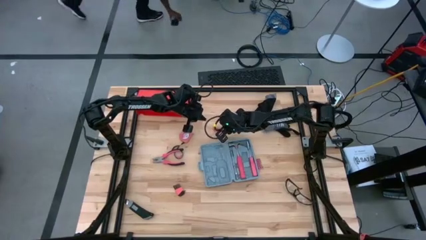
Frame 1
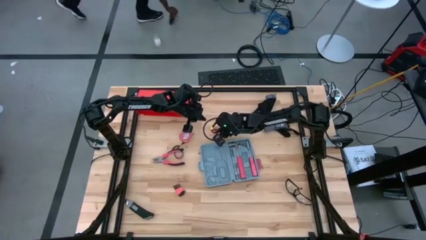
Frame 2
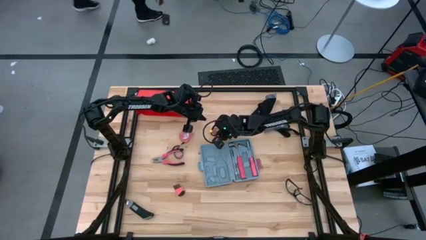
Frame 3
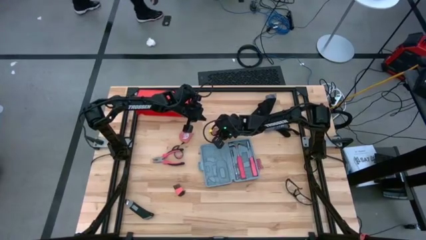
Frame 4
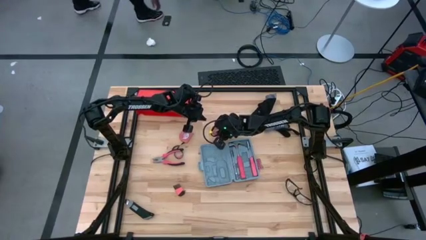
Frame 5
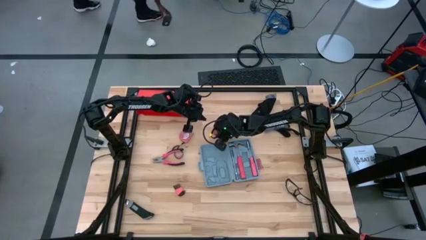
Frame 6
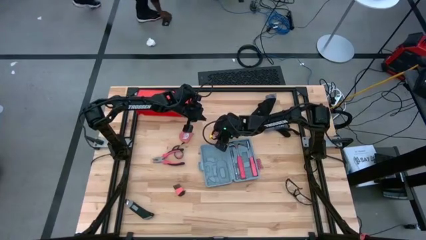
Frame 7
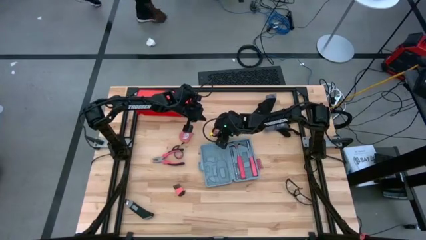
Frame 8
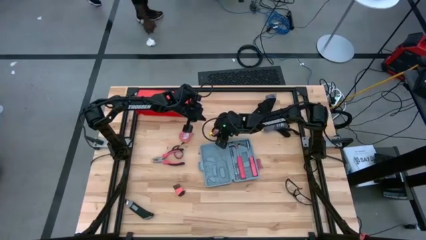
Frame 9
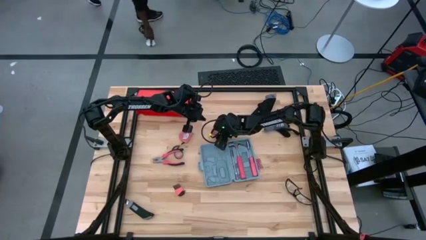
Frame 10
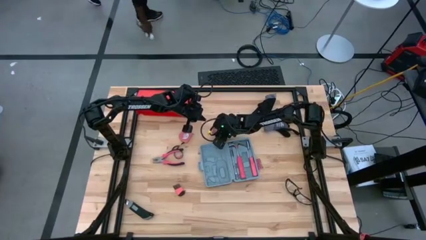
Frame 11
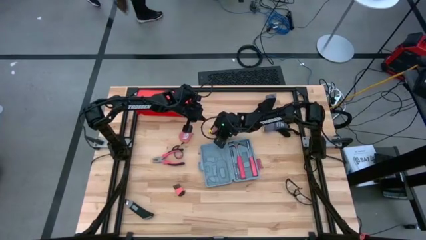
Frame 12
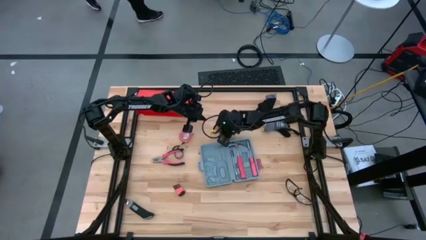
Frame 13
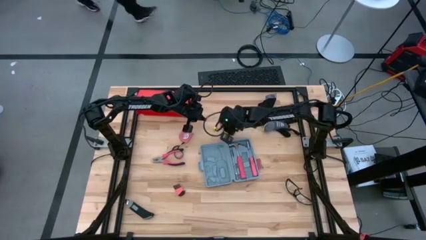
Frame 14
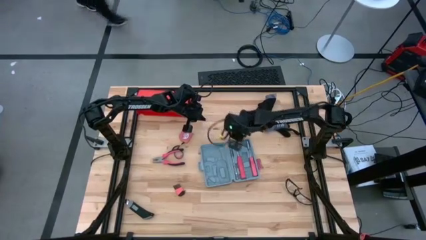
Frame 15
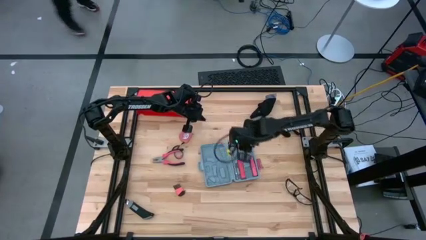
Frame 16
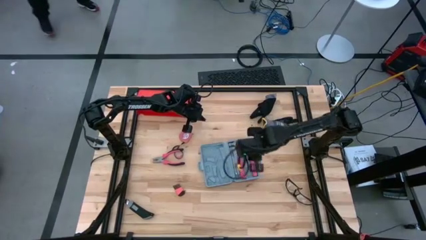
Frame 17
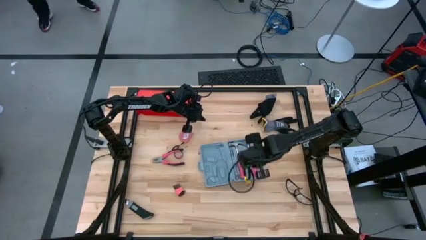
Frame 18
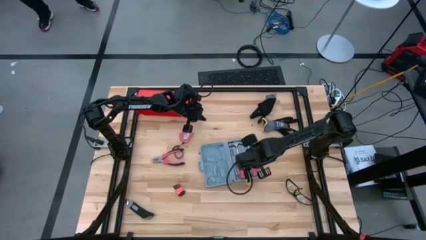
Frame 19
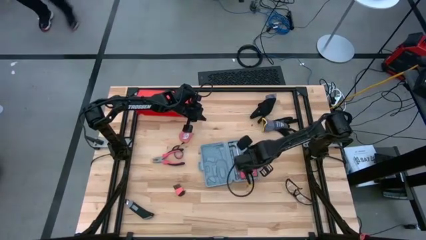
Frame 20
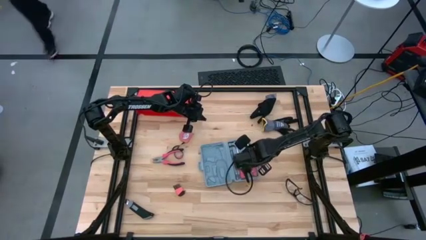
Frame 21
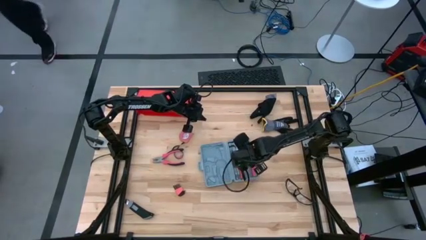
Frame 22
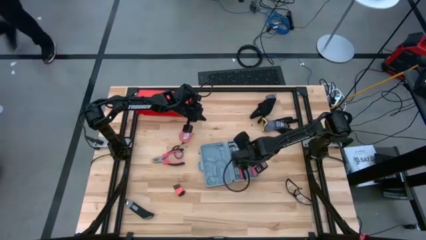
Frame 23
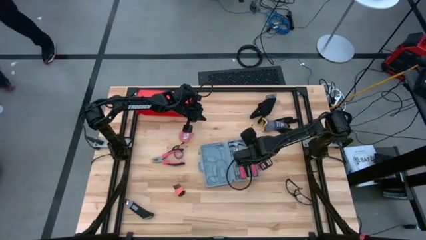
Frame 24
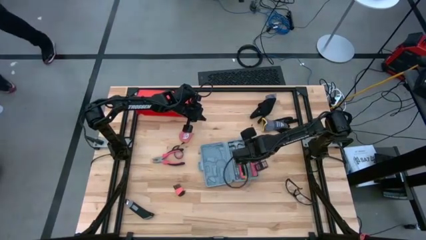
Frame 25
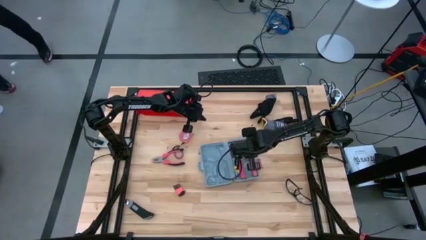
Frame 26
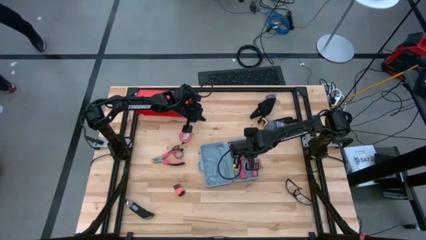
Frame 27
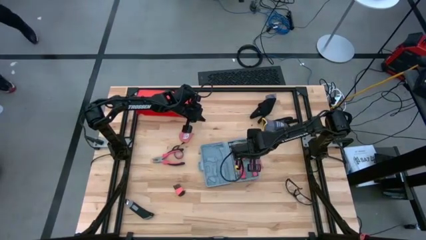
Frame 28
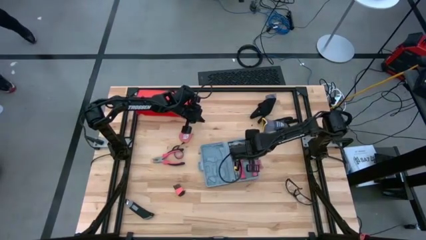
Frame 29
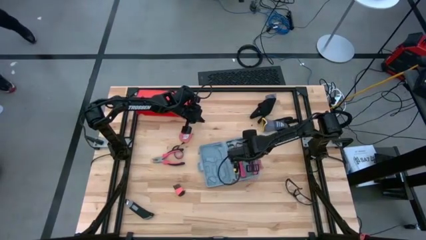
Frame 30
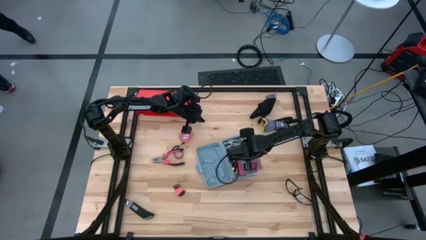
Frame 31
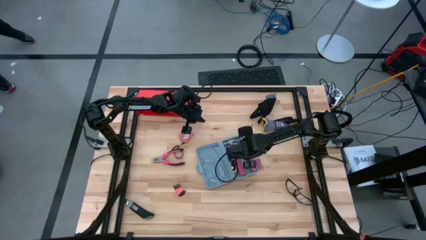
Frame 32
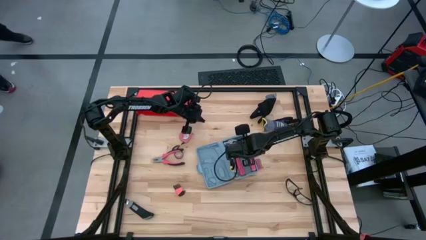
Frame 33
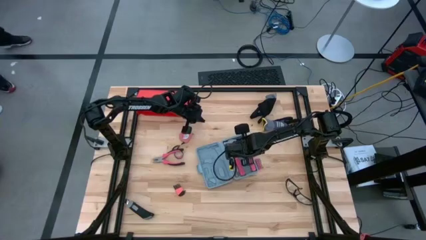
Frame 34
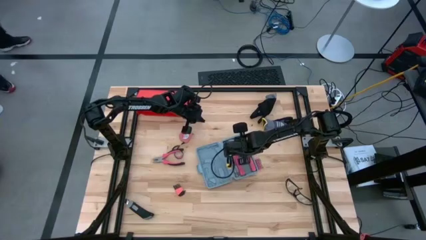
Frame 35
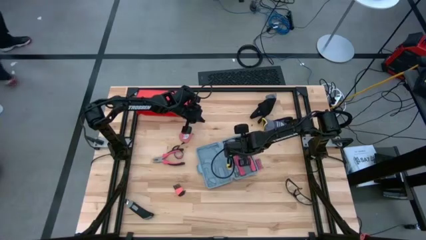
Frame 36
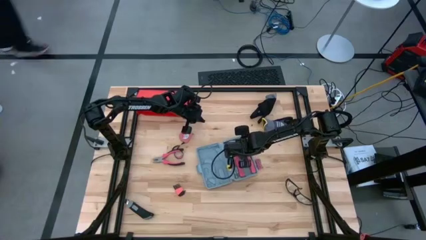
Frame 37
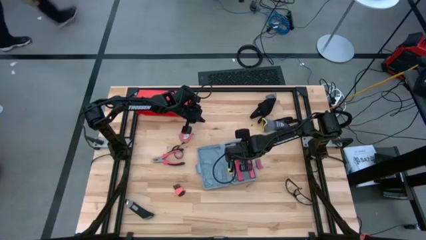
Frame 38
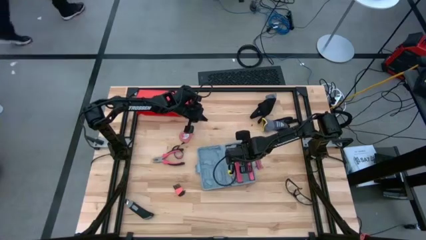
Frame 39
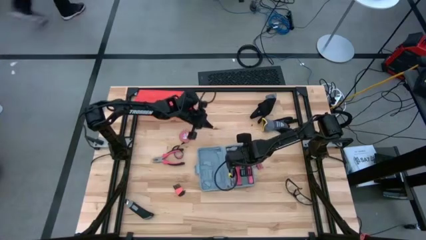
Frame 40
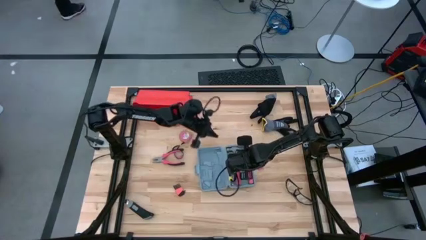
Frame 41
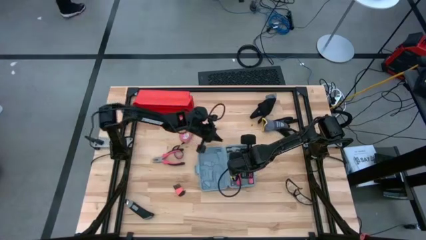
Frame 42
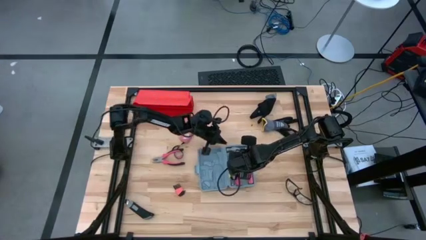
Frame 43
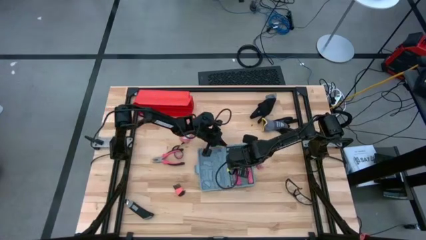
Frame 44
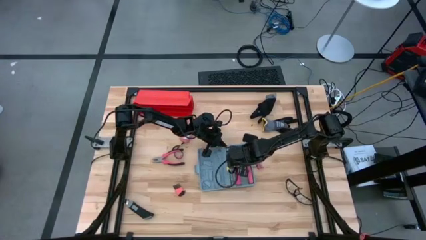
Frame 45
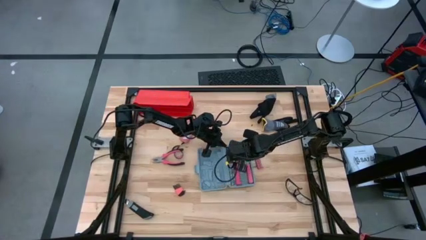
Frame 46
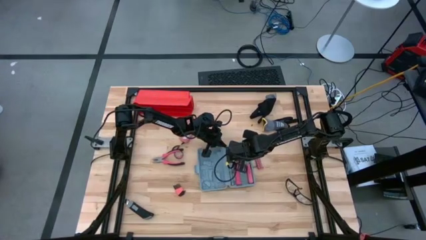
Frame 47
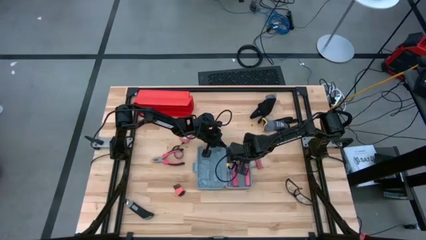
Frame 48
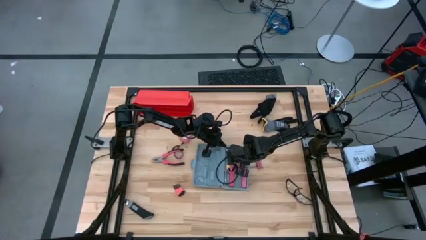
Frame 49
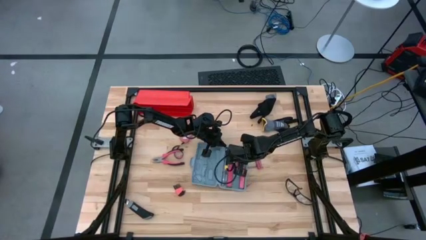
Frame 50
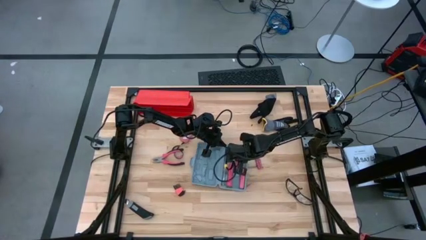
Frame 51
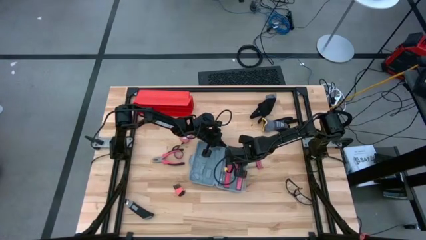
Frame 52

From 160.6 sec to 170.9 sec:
Task: prefit tool cases
Put the screwdriver bit holder in the gray pre-fit tool case

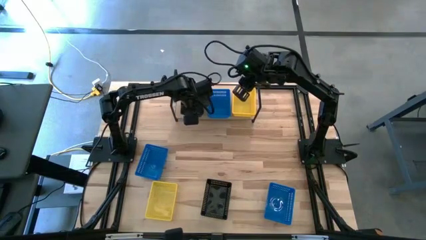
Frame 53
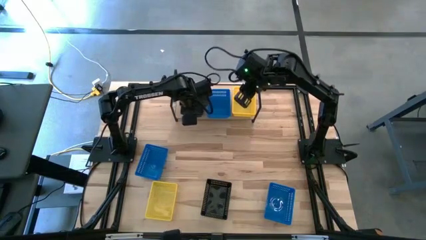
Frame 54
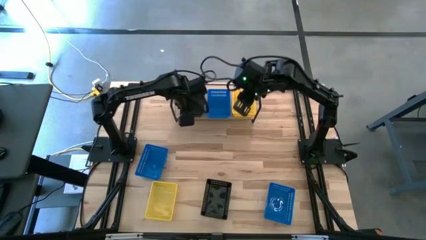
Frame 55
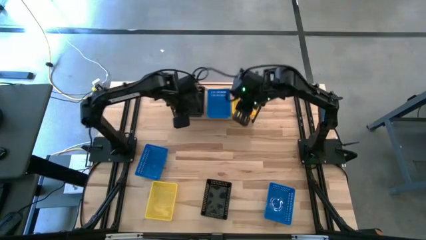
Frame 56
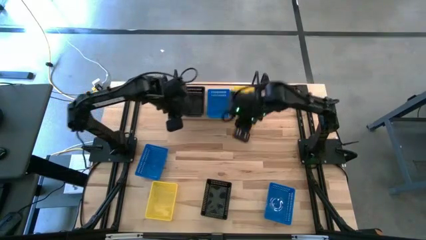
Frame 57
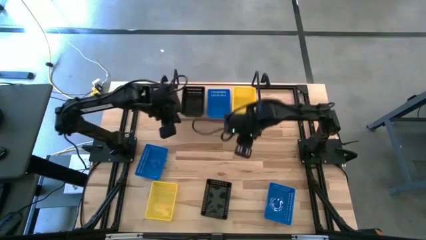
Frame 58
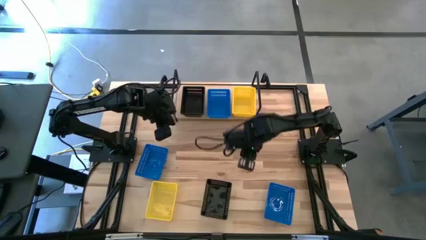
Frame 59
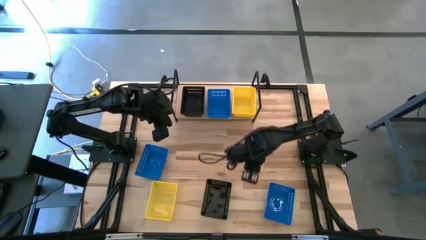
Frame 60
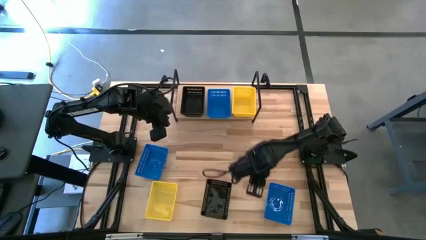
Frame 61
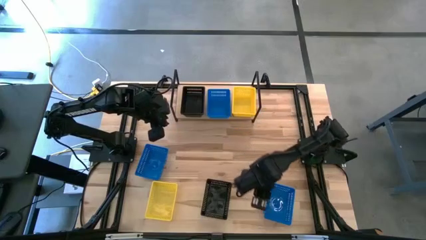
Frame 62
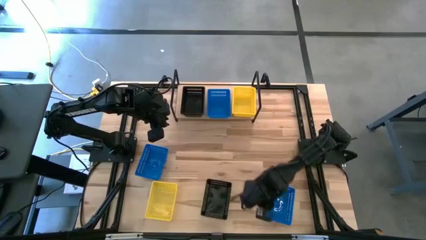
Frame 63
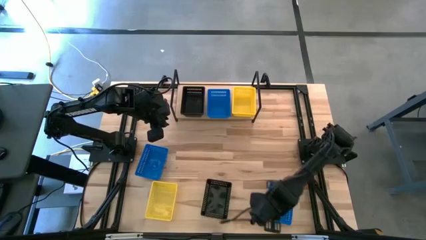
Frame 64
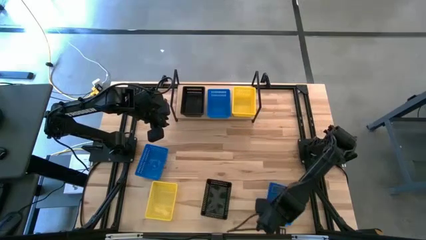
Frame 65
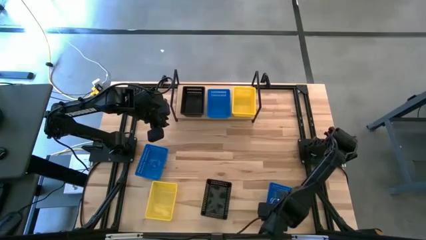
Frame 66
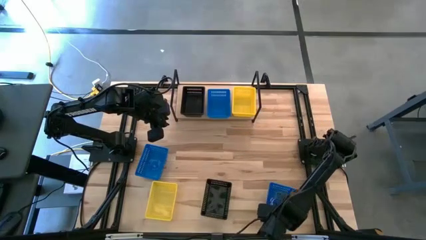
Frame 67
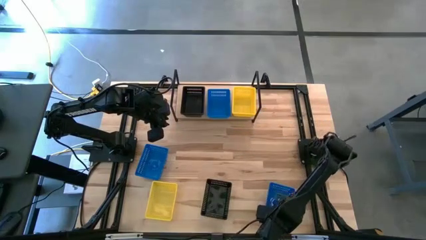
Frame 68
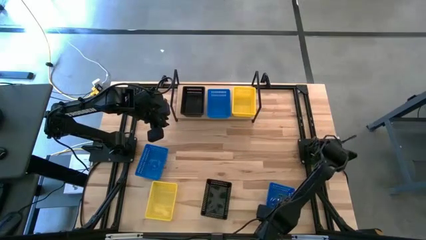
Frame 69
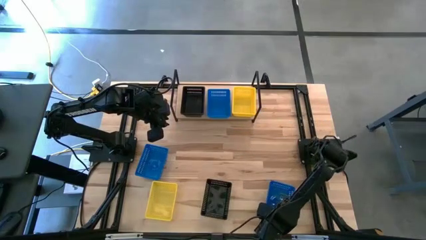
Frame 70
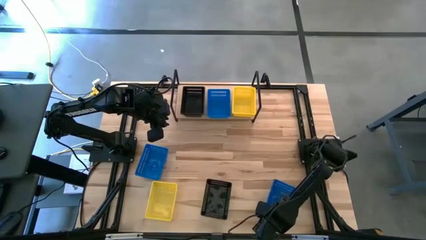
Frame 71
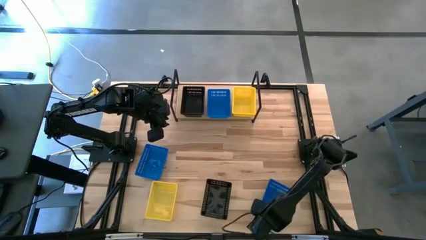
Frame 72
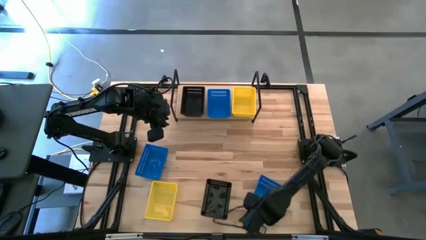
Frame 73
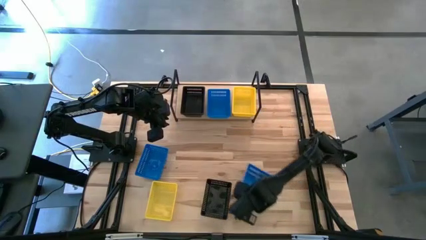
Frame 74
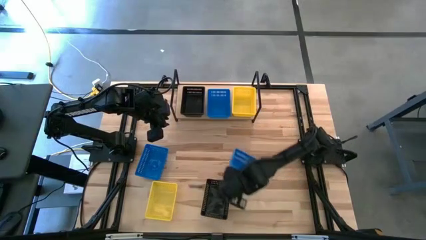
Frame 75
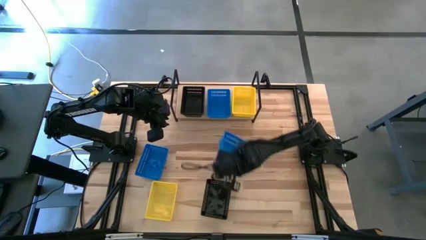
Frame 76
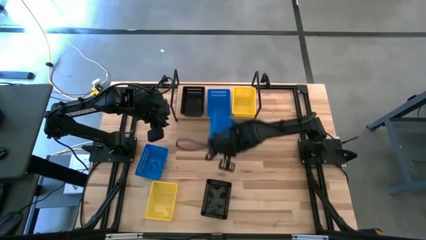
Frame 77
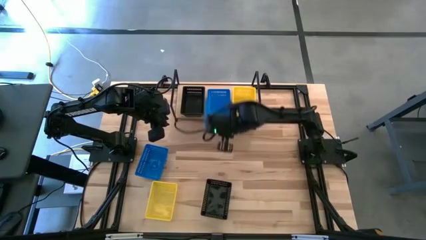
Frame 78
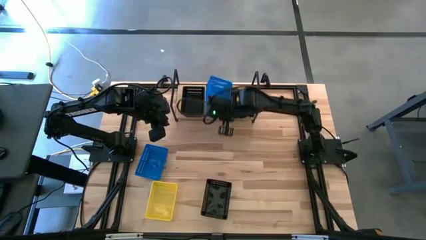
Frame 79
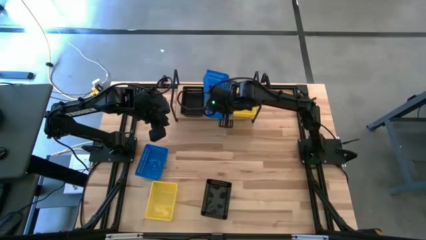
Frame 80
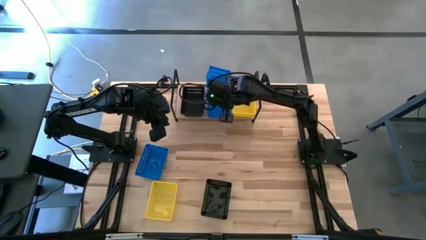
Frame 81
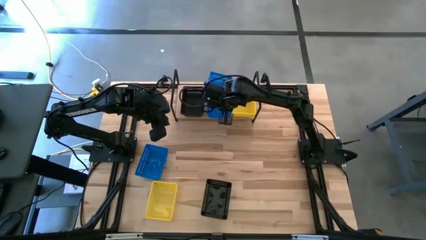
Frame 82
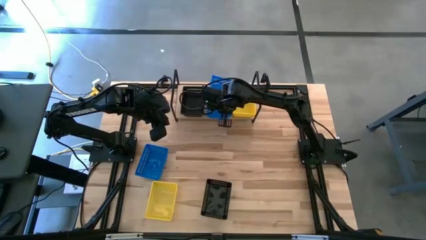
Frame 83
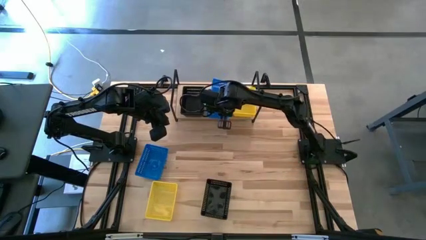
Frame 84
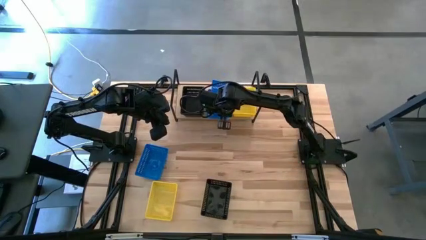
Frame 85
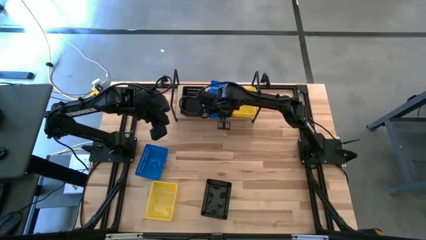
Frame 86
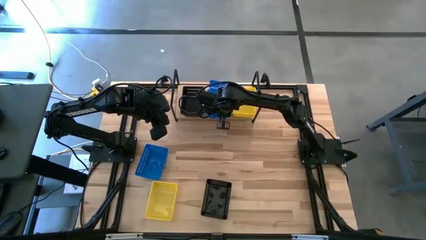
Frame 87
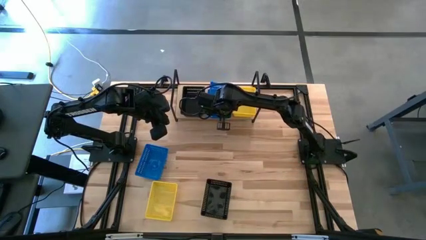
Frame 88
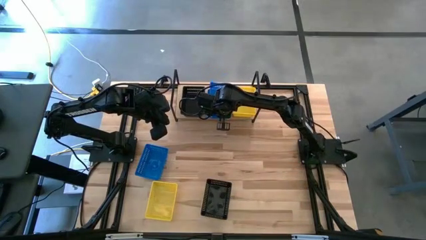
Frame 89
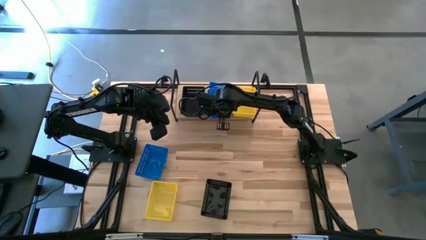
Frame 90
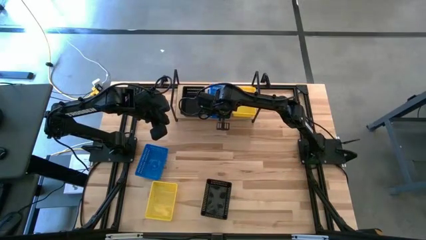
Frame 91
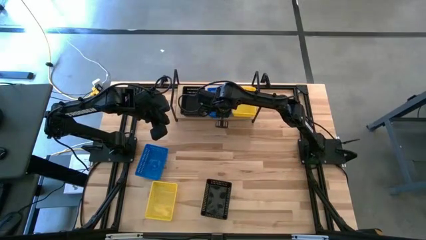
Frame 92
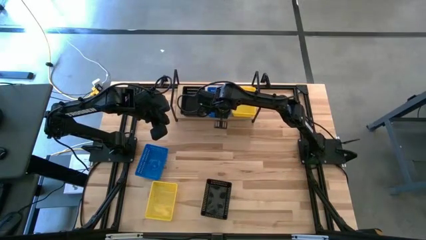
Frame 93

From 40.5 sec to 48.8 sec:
Task: Stack baskets on shelf by color
Stack the right blue bin on top of the blue bin on the shelf
